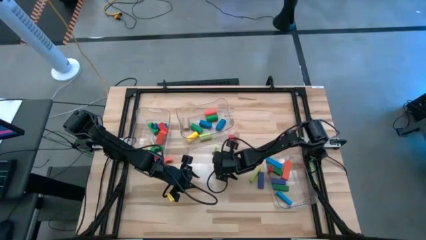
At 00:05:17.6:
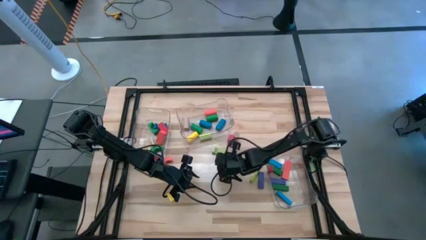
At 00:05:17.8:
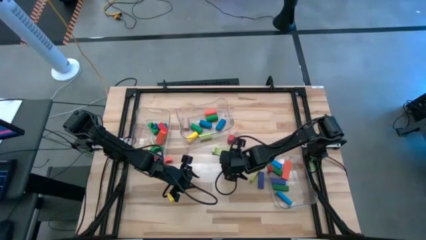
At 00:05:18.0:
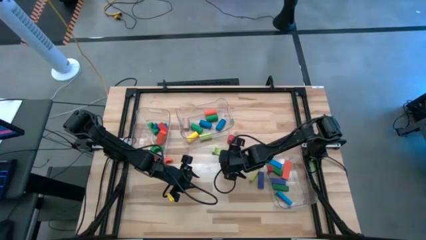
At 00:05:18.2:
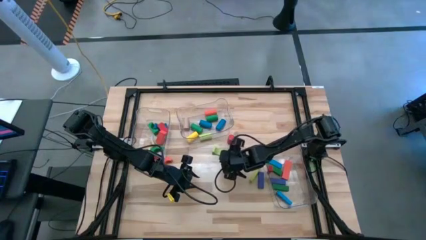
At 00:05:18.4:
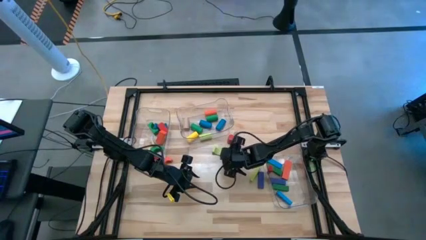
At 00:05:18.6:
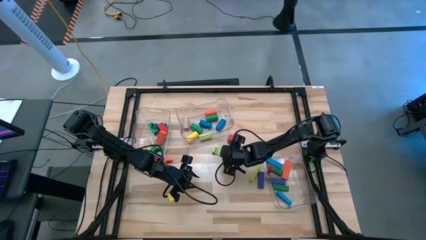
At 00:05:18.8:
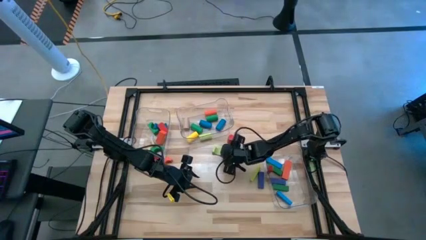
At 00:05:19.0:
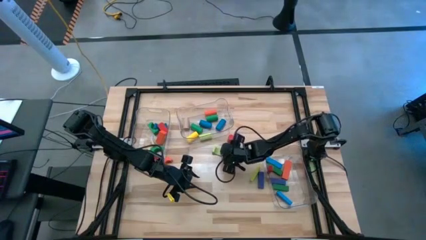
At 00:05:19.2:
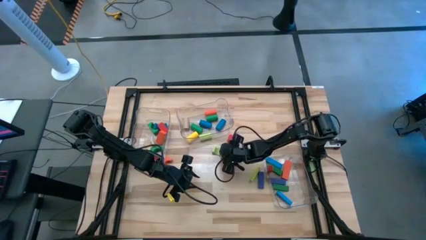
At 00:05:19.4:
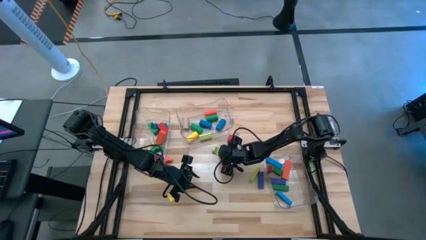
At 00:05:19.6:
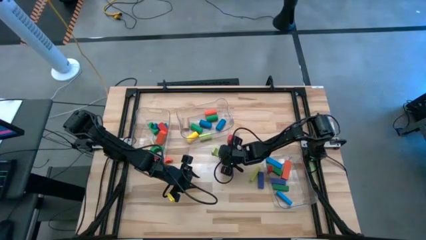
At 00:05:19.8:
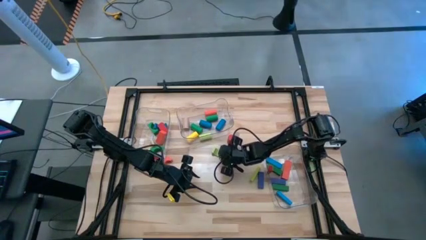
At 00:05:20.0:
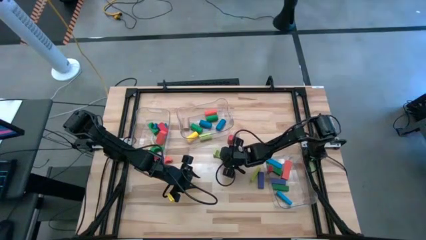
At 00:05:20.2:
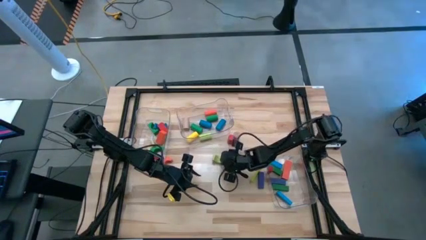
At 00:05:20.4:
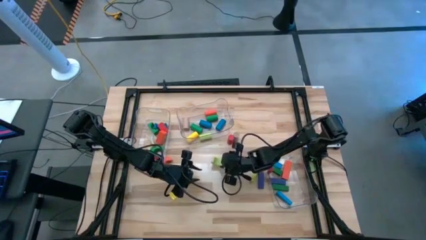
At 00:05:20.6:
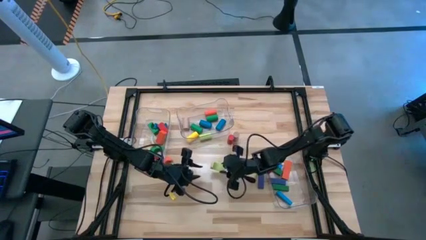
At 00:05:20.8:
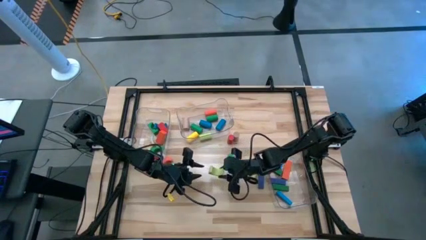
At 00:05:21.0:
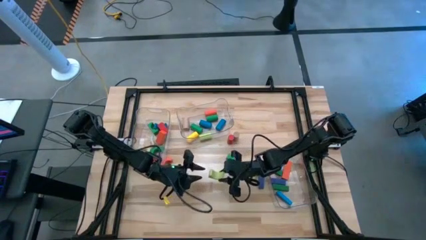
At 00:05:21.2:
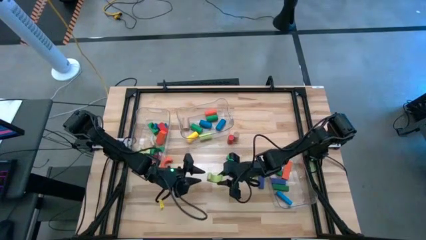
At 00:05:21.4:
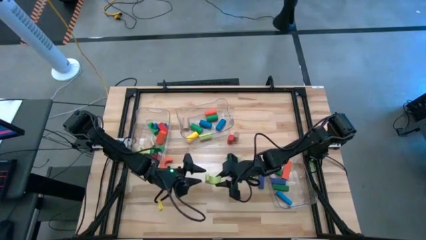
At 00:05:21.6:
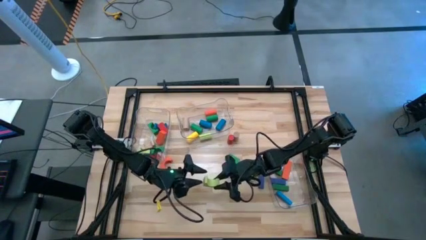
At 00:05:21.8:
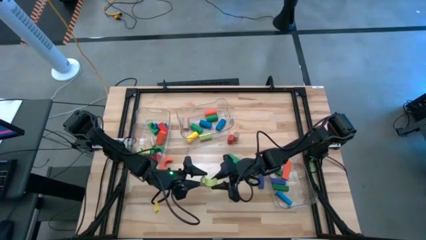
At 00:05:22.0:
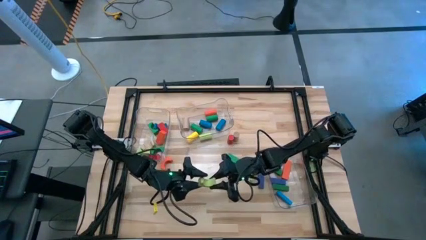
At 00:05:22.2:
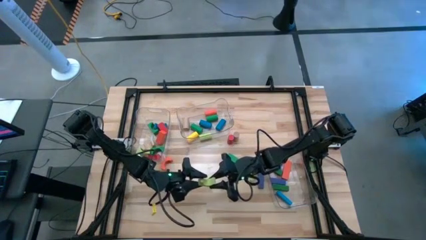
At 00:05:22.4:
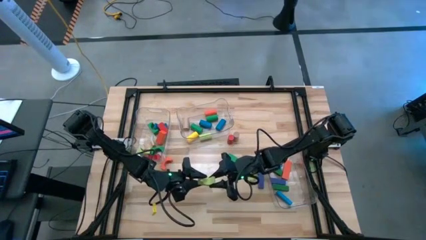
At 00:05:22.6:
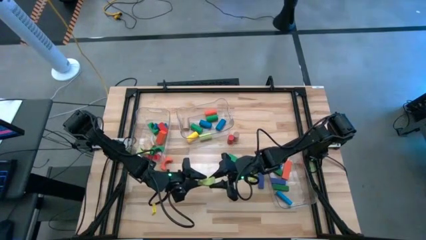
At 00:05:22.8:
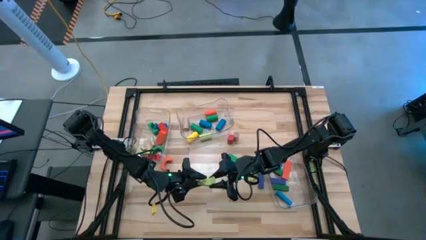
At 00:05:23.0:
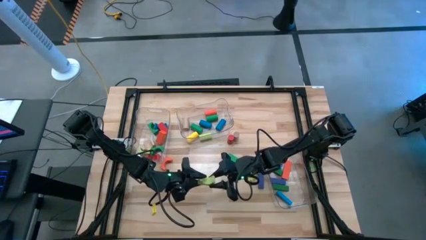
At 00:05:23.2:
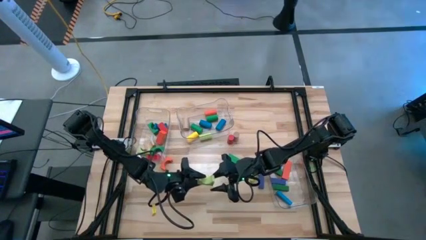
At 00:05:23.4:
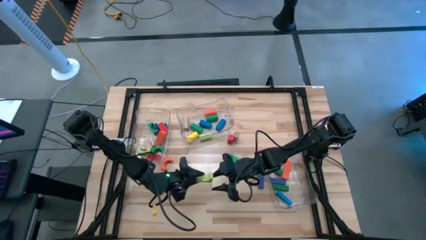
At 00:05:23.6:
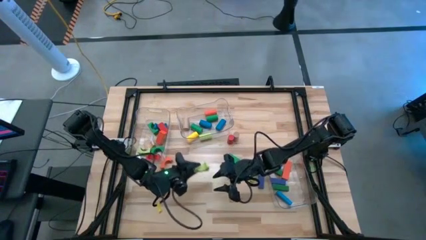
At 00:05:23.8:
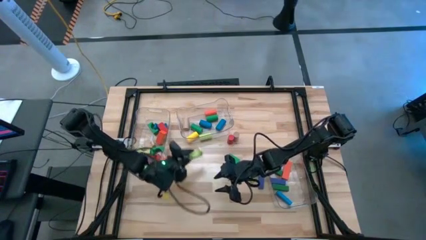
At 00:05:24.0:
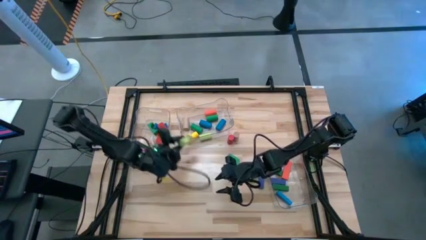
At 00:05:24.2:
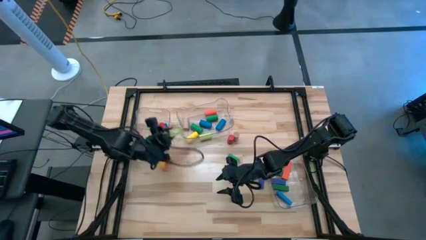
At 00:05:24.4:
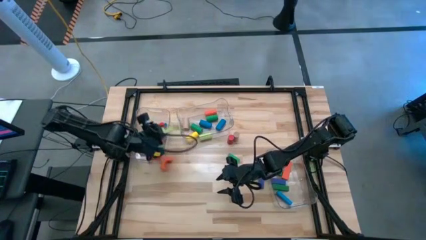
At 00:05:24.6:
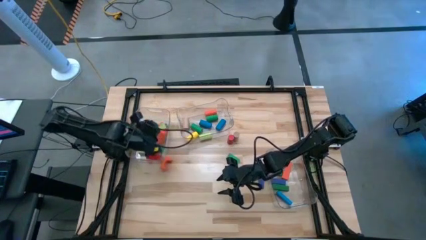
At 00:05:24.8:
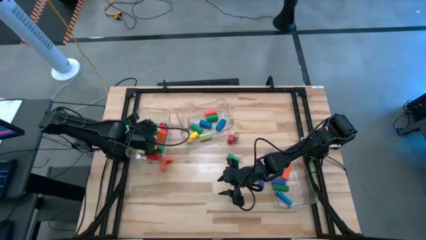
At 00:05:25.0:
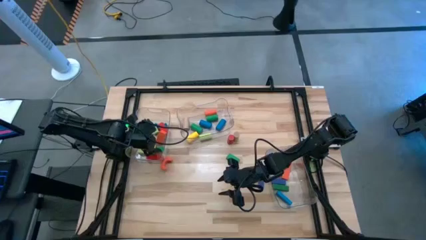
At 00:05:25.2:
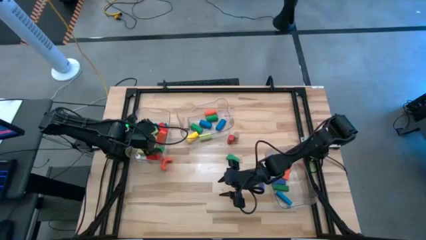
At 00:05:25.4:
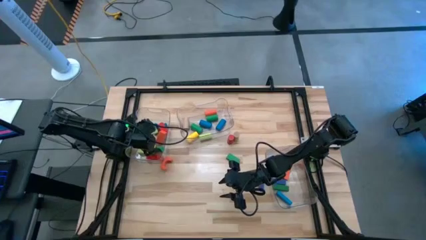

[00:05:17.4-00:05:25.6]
Task: Sort blocks by size
Put the light green arch block into the top transparent bin

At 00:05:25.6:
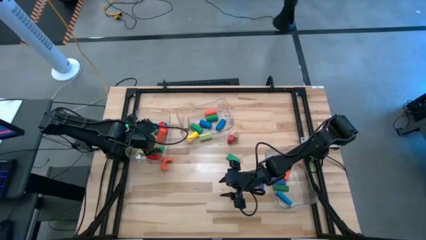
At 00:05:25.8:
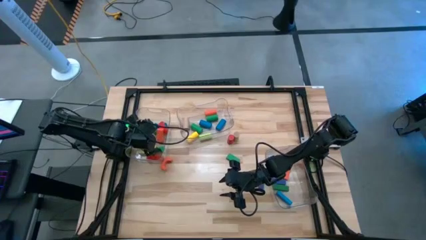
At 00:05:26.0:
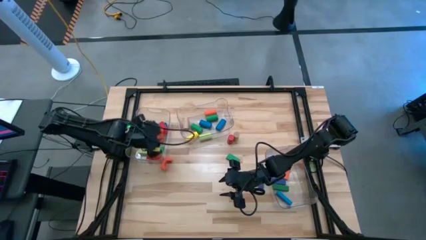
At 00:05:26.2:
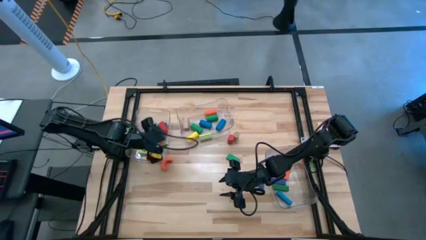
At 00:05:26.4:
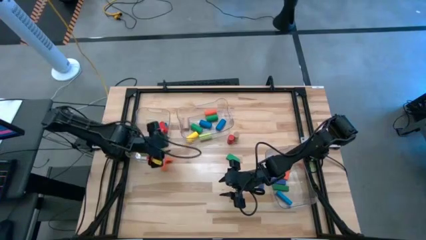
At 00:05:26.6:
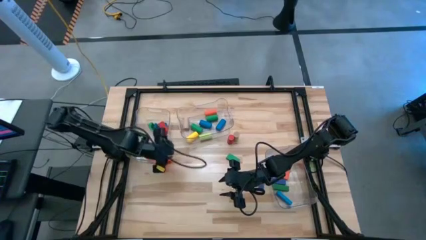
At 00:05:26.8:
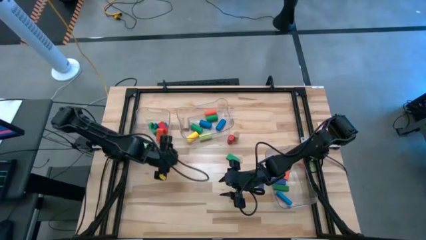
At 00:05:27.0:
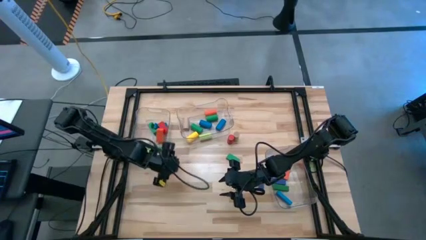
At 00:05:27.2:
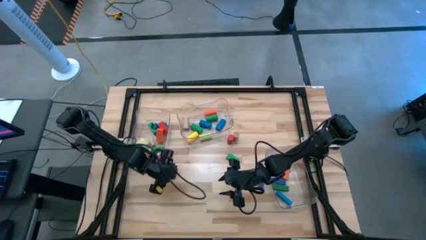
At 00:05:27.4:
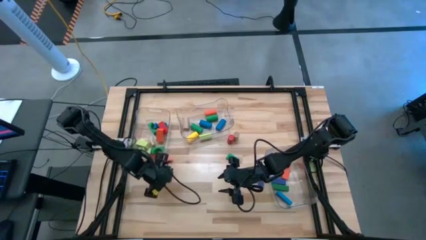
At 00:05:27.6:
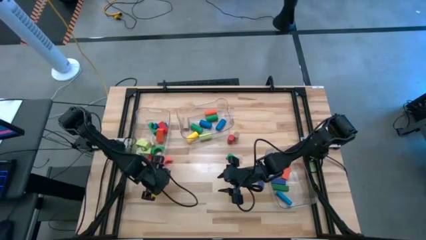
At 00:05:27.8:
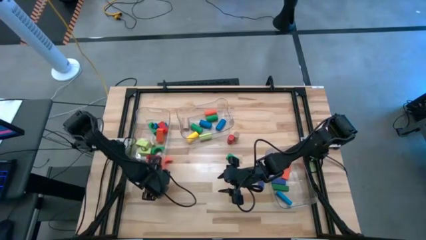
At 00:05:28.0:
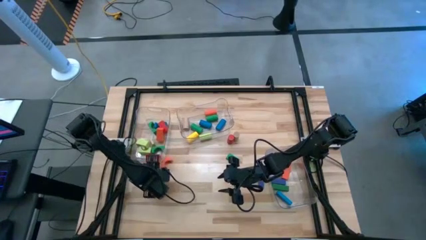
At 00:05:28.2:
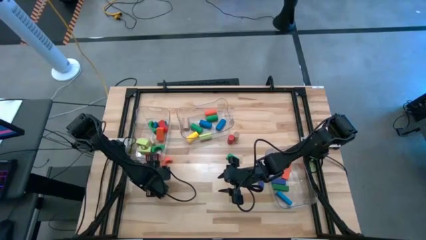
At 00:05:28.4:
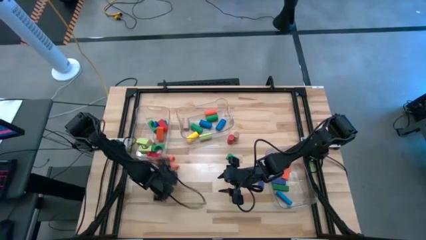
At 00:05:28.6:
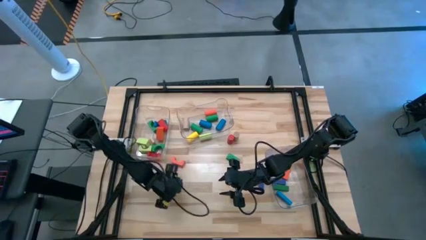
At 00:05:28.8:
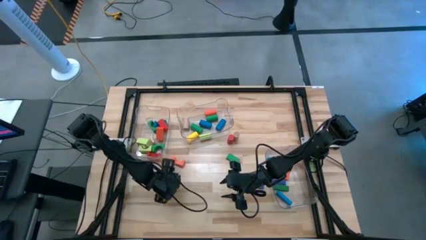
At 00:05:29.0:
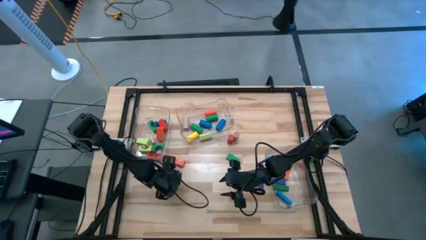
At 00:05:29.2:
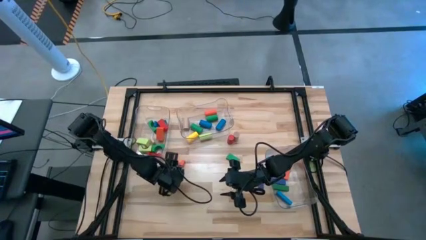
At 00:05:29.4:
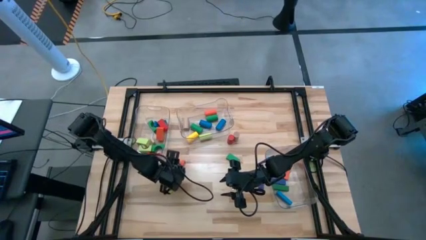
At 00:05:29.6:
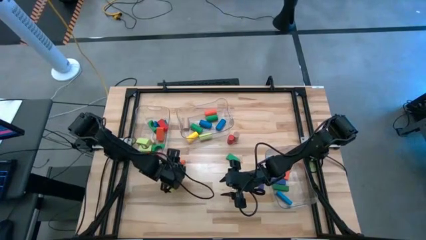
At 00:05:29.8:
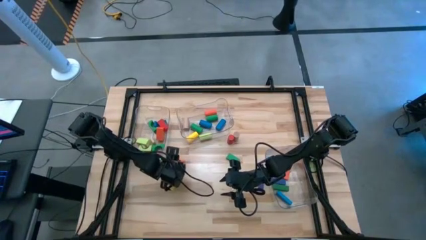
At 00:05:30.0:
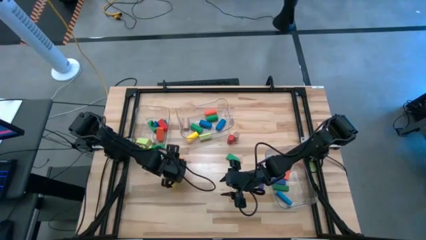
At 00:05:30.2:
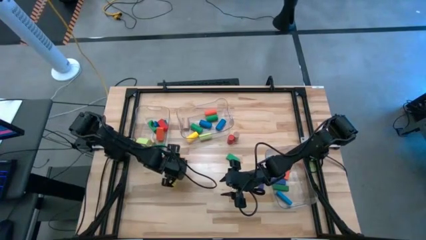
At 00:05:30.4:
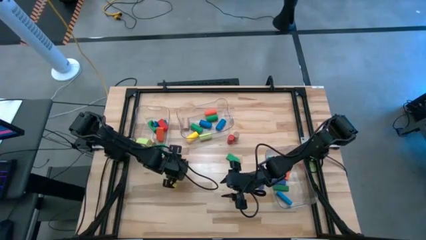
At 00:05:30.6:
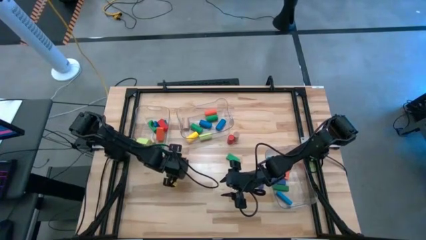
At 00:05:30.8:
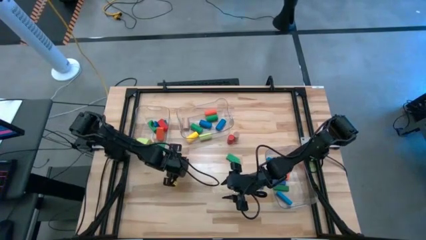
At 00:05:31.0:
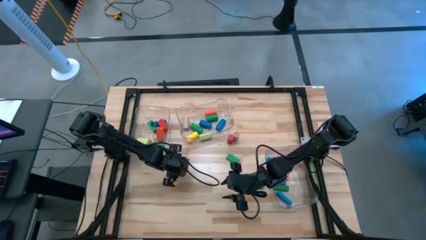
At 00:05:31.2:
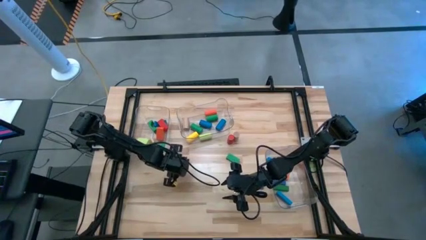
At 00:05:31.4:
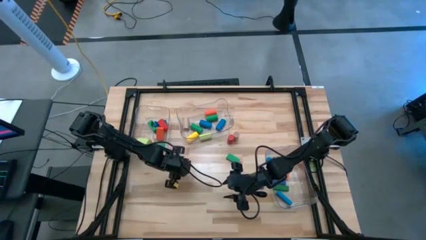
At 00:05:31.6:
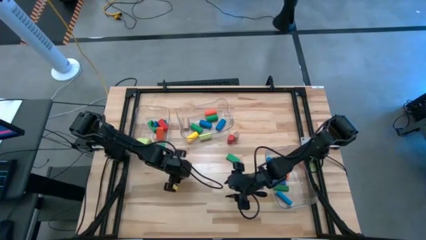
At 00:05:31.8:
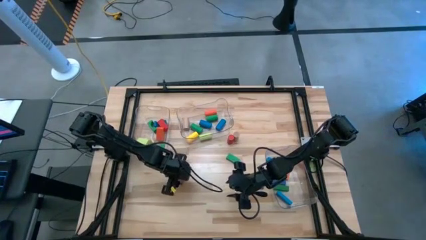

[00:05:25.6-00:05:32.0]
Adjust the orange arch block to the left middle of the table
